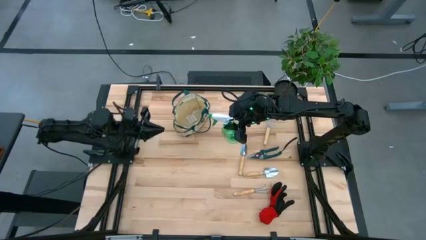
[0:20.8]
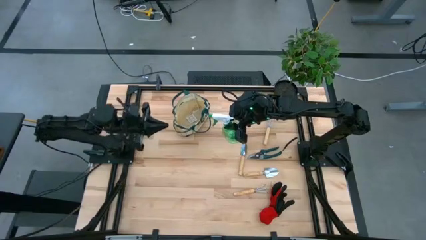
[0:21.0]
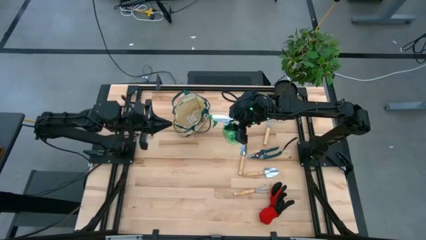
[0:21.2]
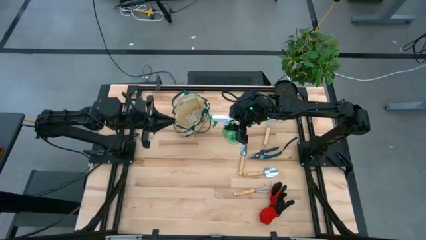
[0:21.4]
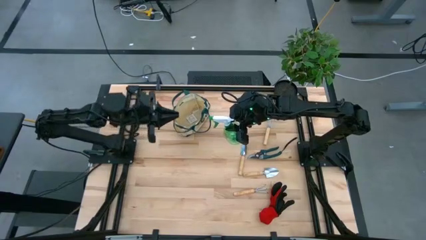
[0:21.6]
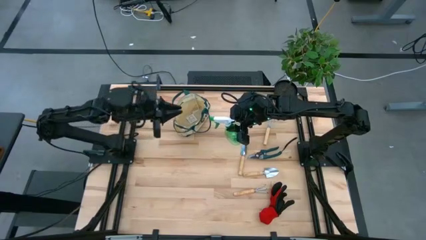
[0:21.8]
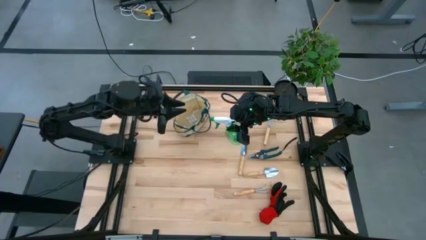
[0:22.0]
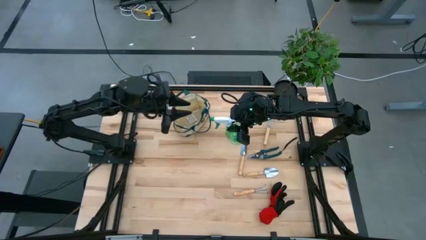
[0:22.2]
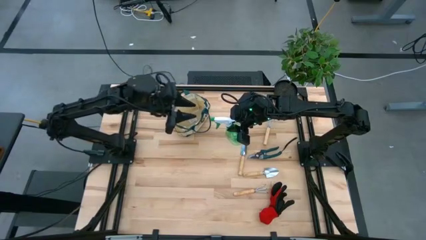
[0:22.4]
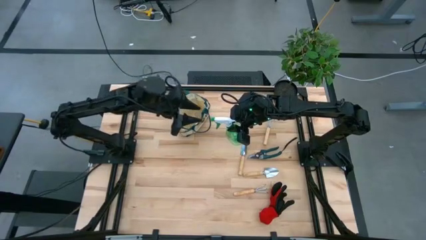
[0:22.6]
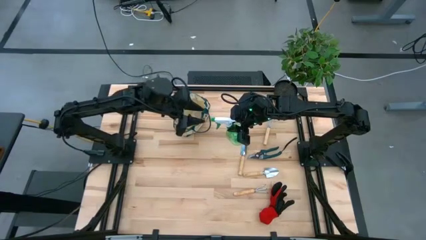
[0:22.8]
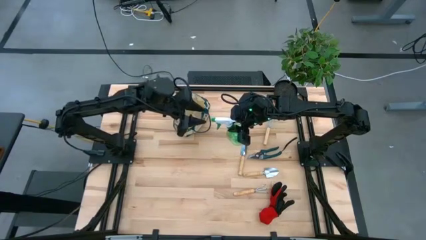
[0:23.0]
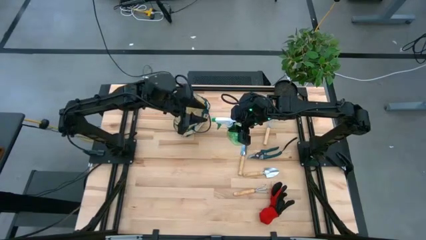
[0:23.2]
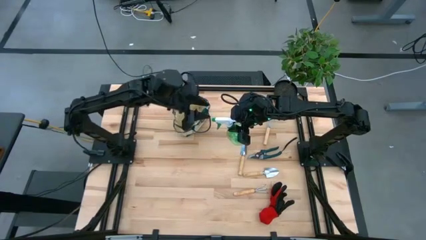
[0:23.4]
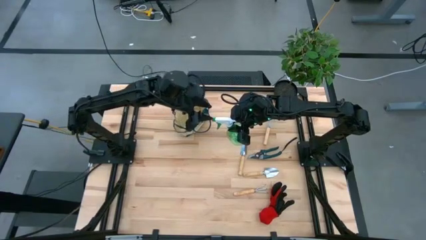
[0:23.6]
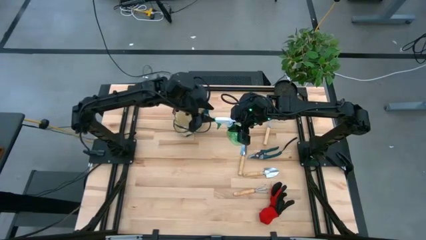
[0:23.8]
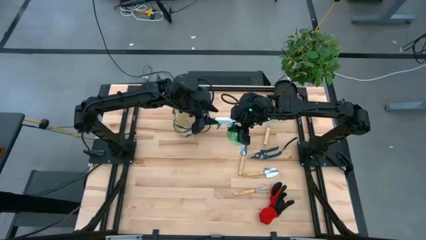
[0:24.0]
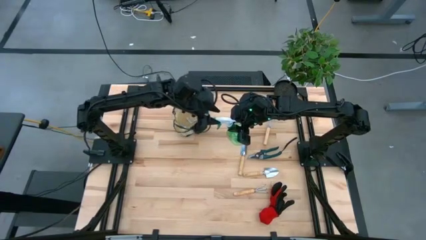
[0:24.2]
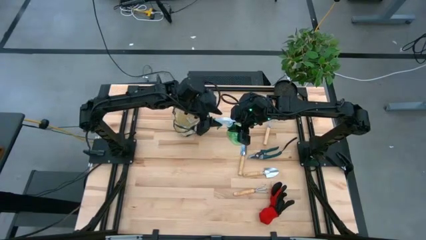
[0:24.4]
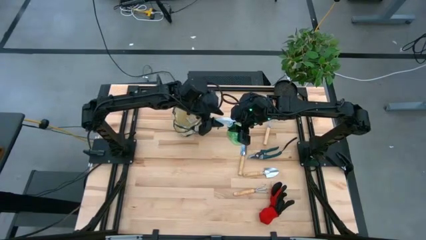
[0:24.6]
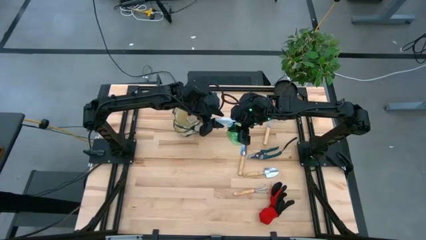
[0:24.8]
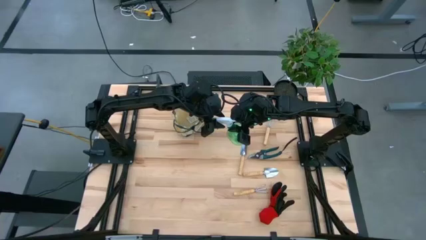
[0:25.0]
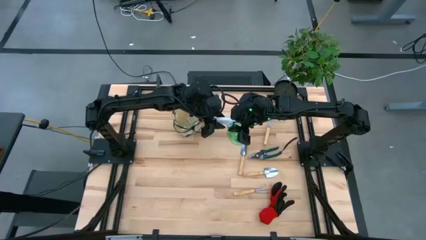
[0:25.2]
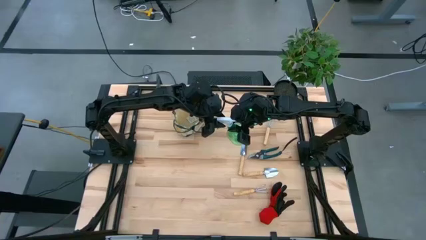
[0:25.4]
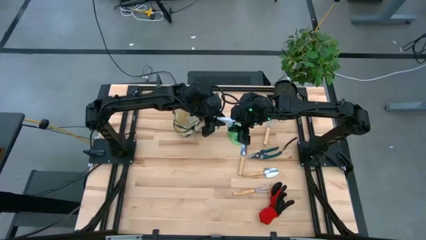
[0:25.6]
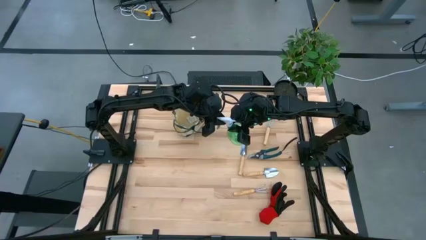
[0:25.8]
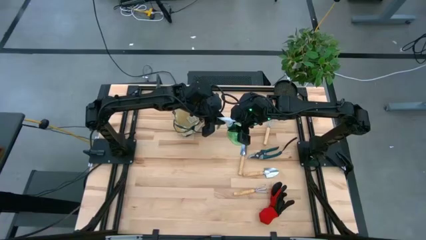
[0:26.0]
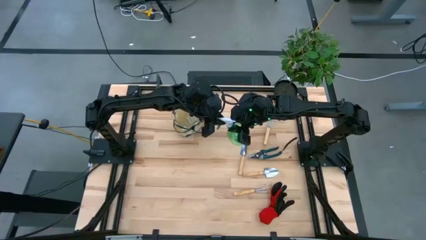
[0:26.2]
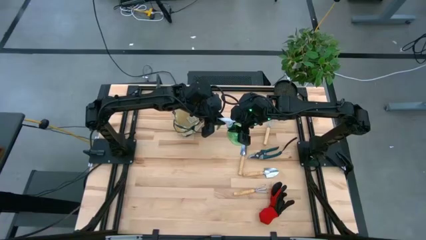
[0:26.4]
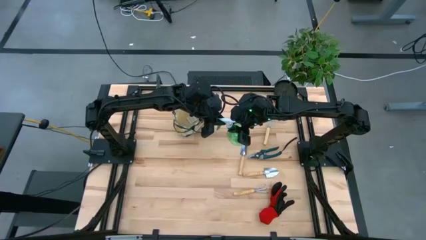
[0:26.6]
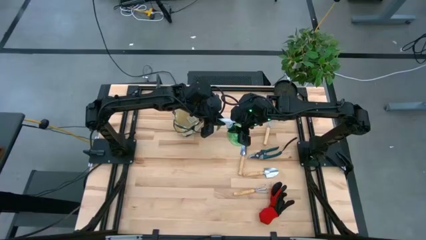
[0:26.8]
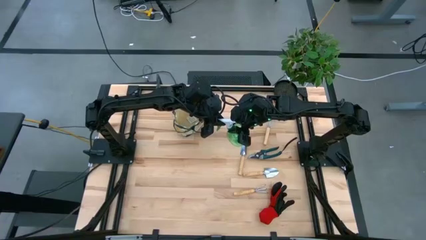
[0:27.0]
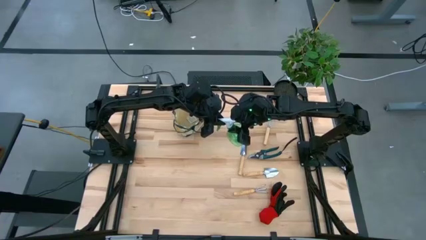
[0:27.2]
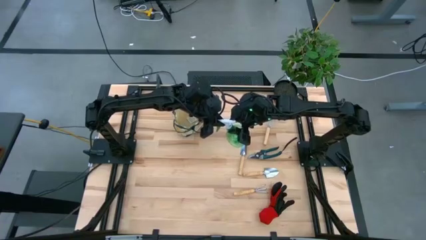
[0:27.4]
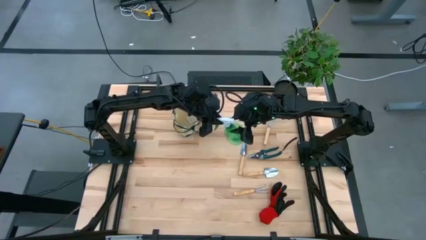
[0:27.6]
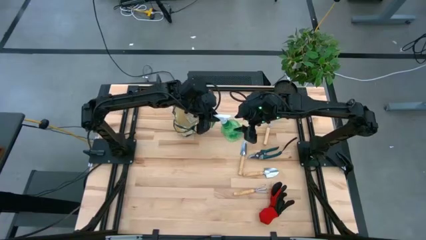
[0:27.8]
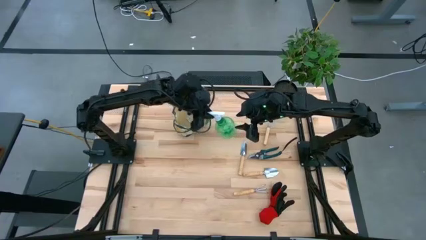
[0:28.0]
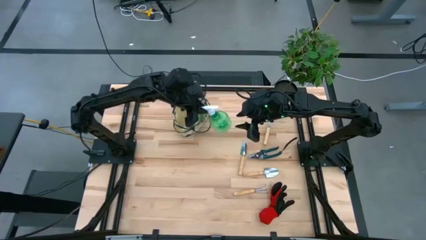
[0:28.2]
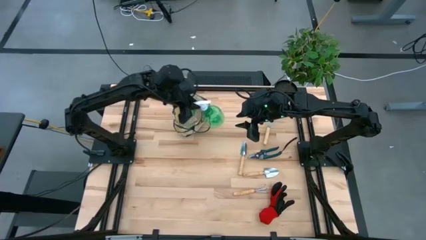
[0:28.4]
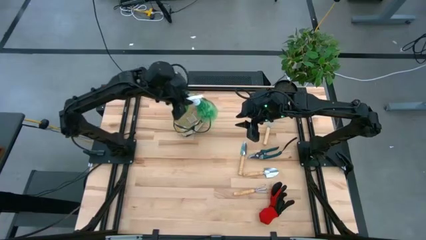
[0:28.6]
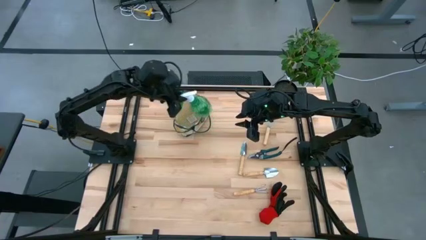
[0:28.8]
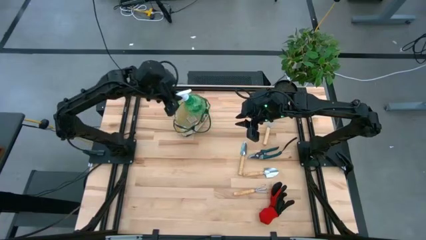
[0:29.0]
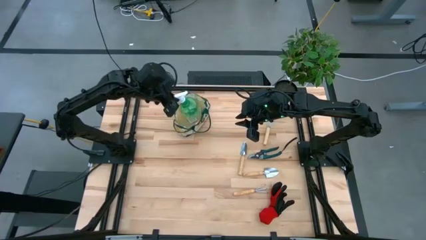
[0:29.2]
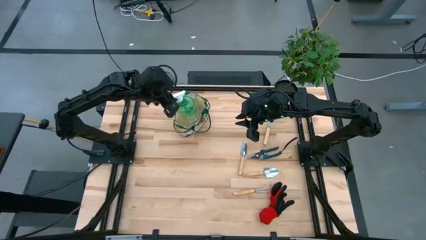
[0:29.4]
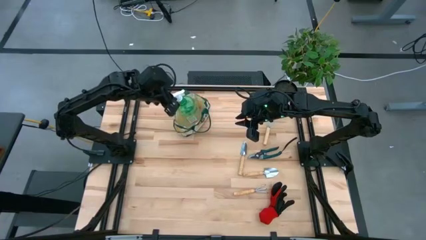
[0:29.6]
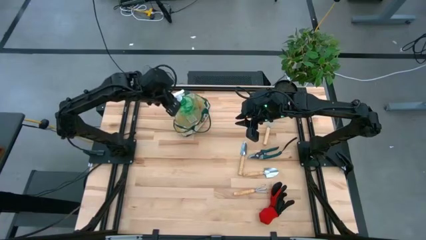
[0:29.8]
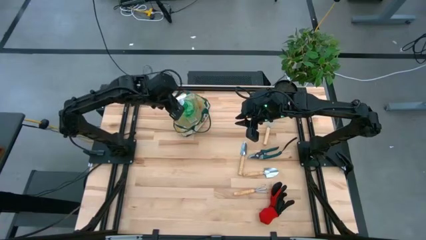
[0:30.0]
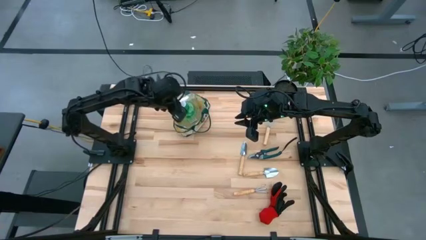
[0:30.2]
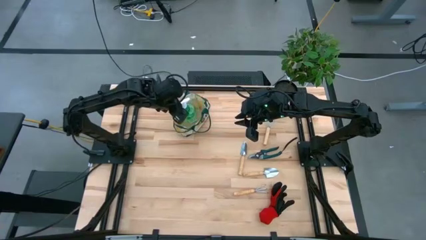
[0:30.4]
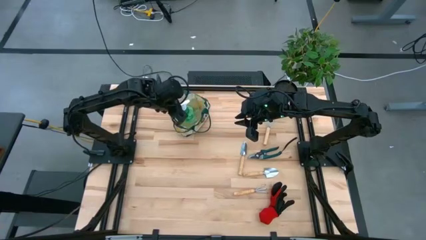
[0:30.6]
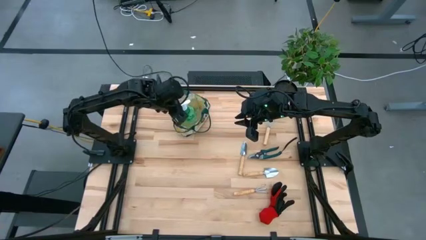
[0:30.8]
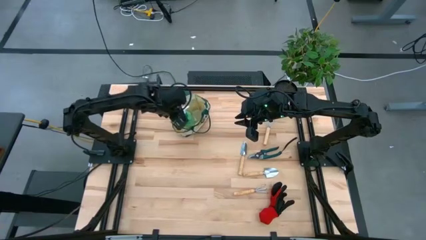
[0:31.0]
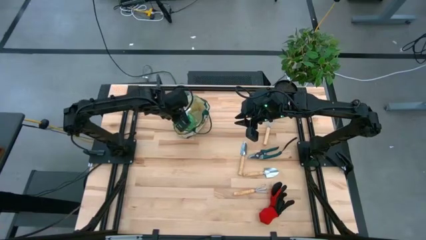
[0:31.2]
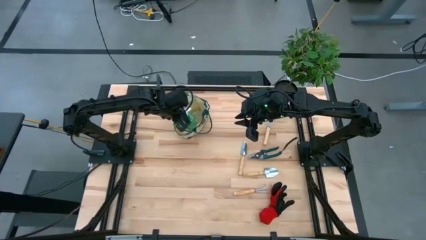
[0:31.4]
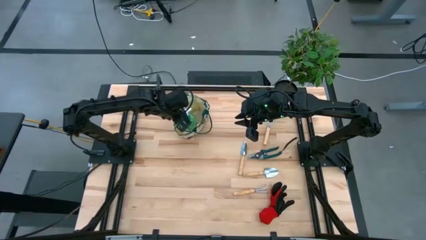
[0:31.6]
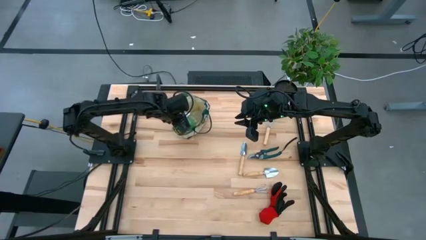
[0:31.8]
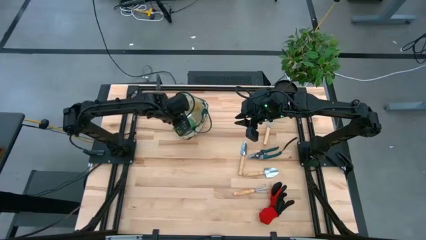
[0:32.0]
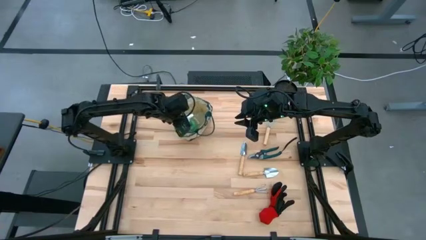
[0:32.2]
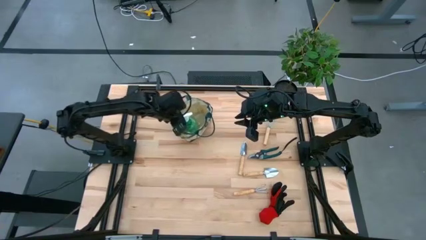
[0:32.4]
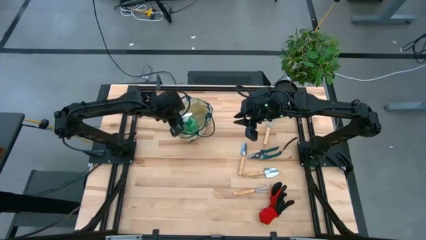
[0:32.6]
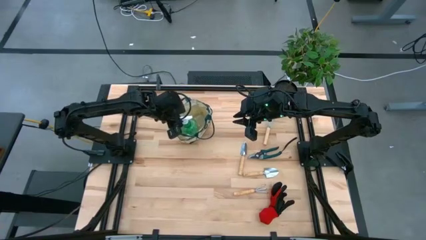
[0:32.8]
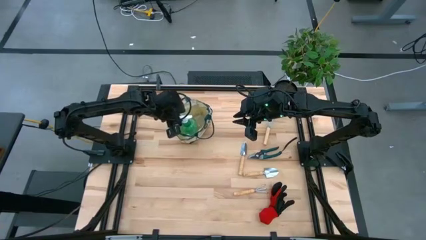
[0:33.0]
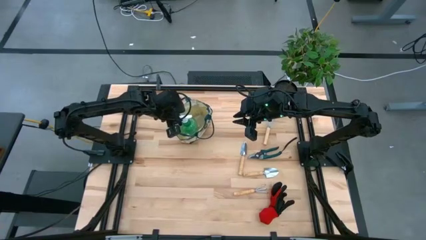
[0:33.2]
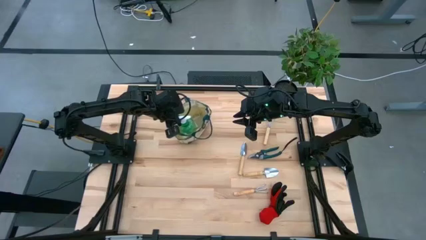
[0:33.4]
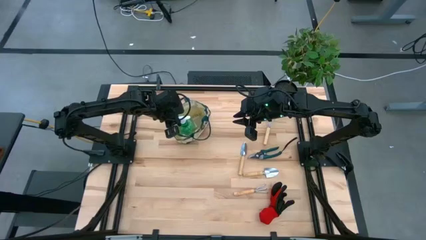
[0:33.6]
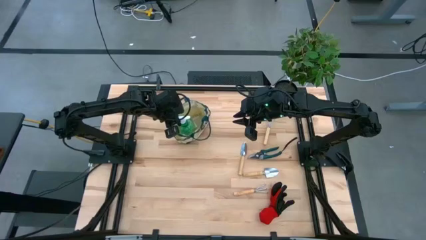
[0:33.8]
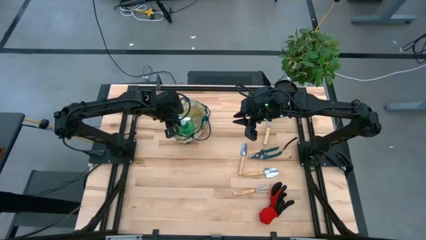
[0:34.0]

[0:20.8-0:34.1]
Task: Pick & Place Garden tools in Gardening bag
Put the green spray bottle into the gardening bag
